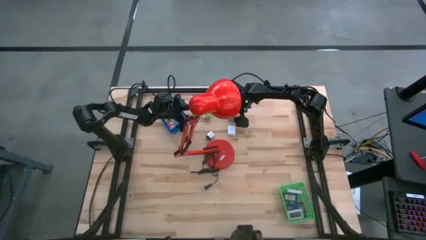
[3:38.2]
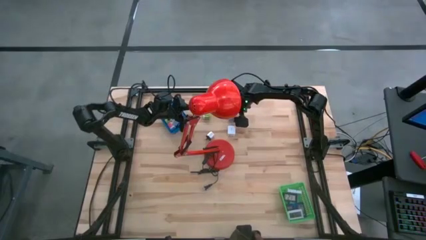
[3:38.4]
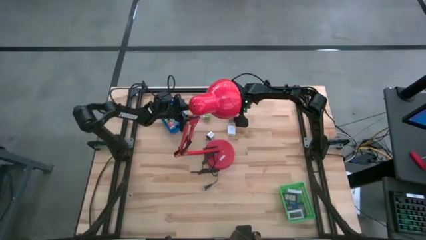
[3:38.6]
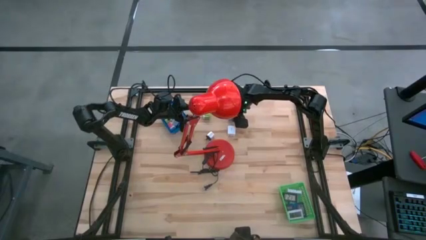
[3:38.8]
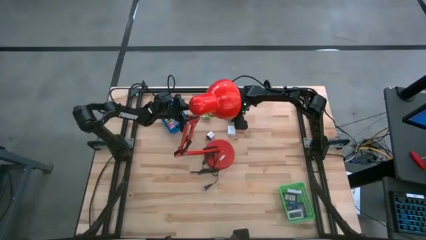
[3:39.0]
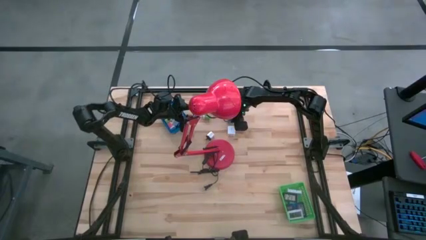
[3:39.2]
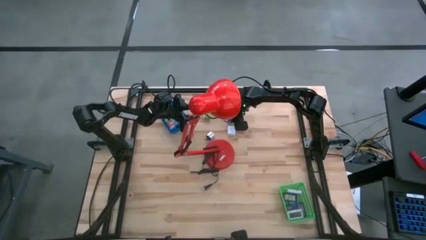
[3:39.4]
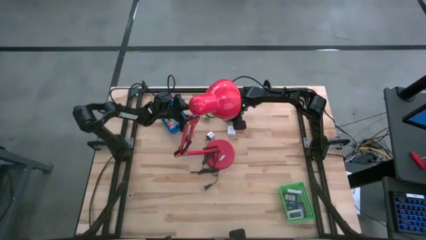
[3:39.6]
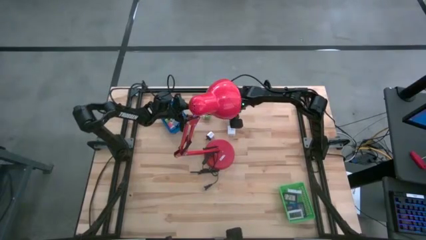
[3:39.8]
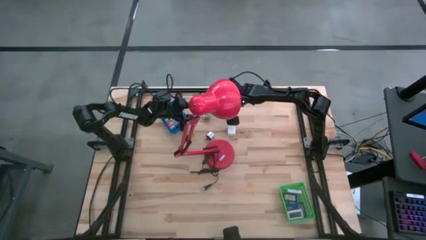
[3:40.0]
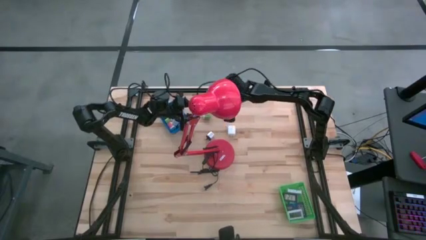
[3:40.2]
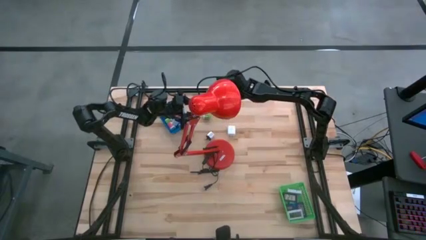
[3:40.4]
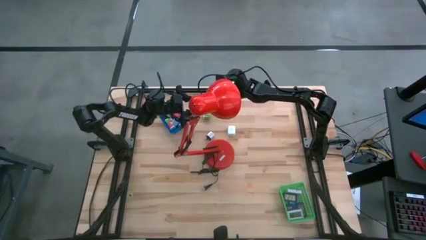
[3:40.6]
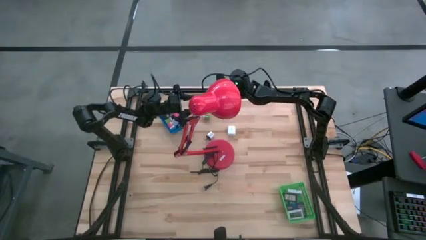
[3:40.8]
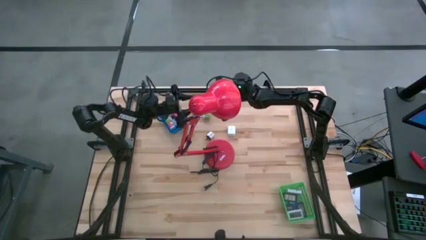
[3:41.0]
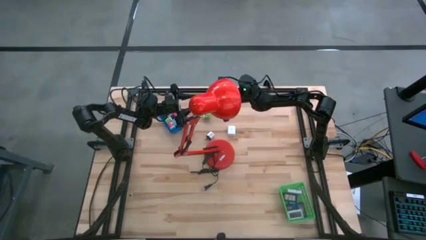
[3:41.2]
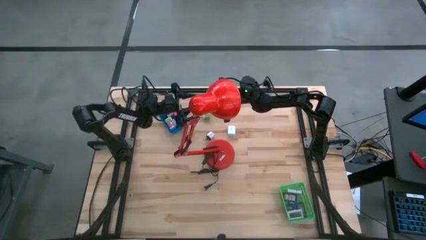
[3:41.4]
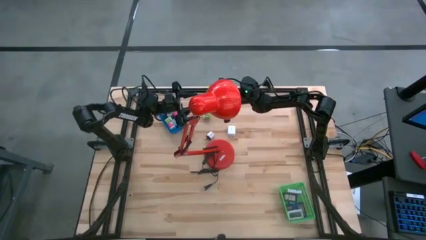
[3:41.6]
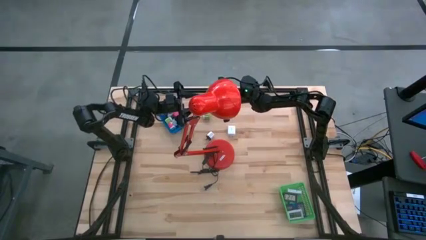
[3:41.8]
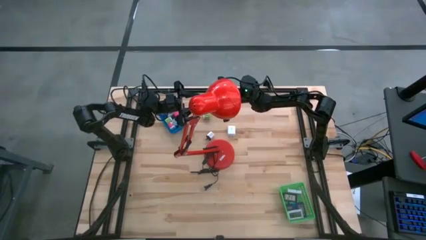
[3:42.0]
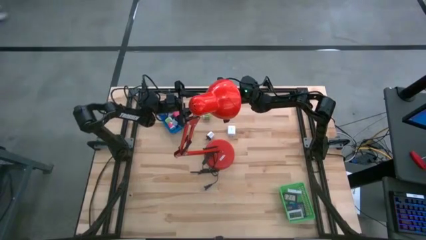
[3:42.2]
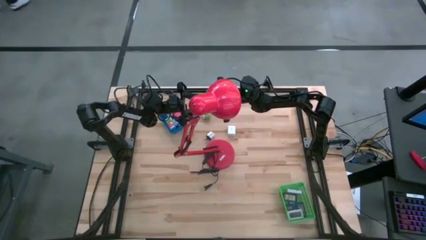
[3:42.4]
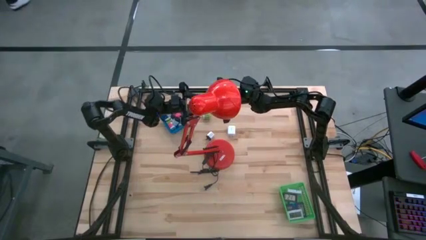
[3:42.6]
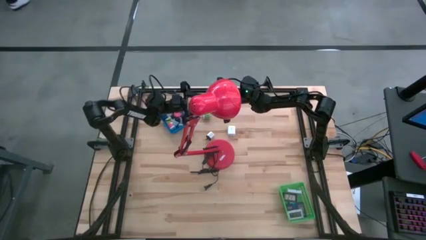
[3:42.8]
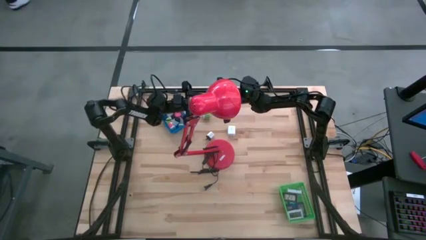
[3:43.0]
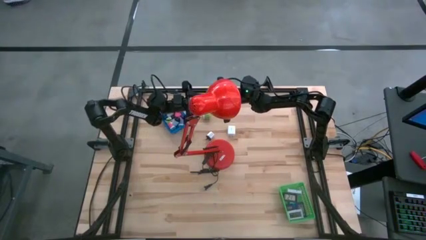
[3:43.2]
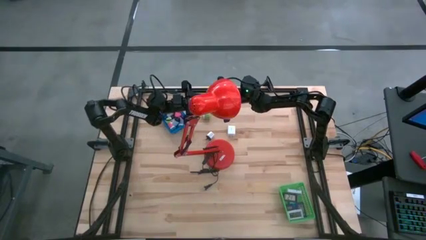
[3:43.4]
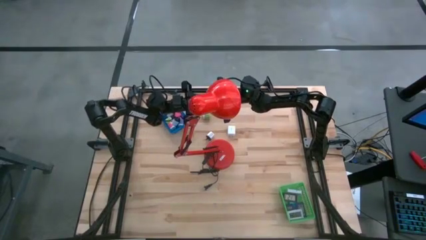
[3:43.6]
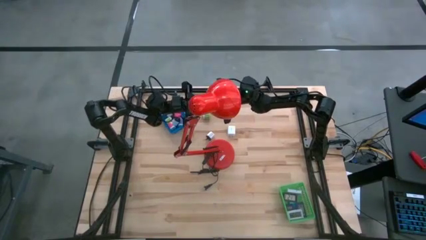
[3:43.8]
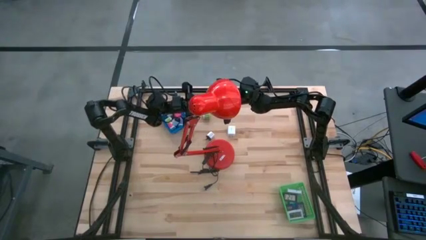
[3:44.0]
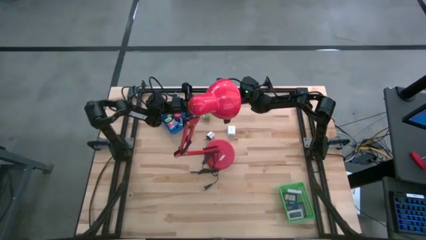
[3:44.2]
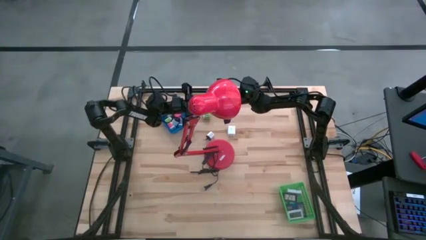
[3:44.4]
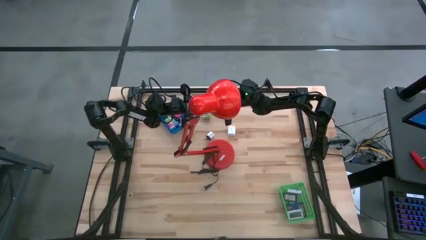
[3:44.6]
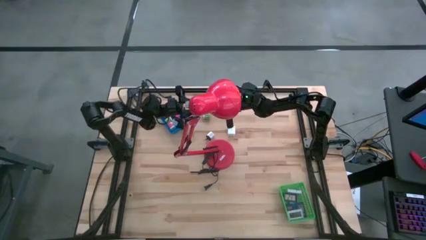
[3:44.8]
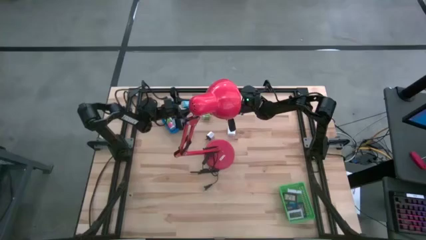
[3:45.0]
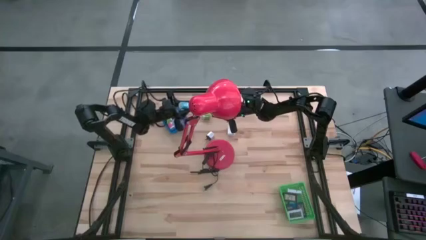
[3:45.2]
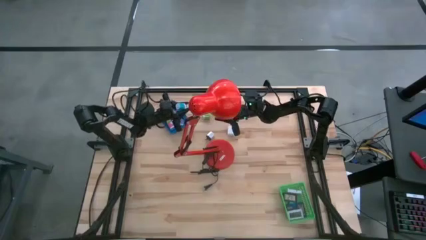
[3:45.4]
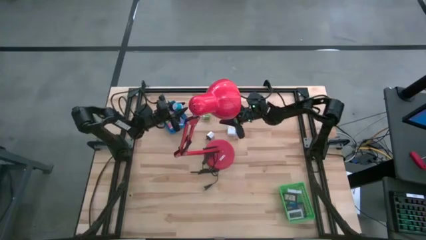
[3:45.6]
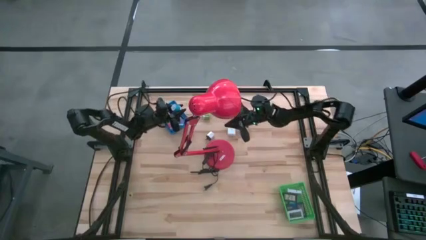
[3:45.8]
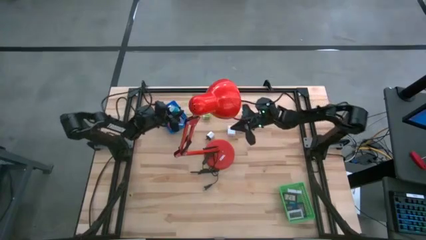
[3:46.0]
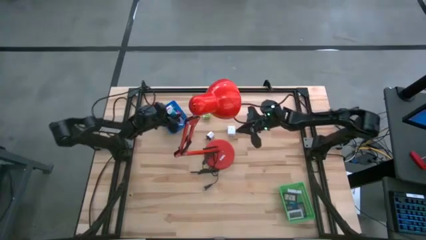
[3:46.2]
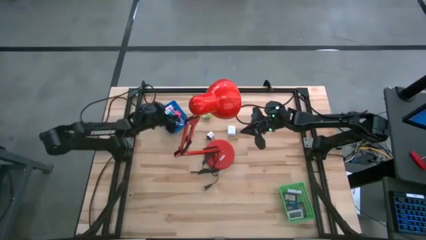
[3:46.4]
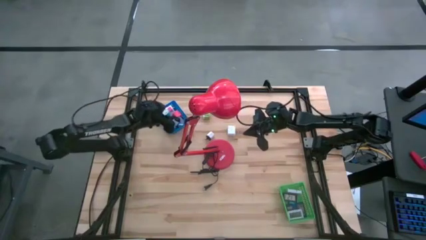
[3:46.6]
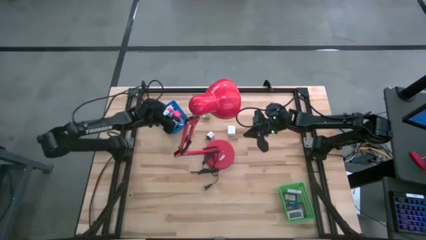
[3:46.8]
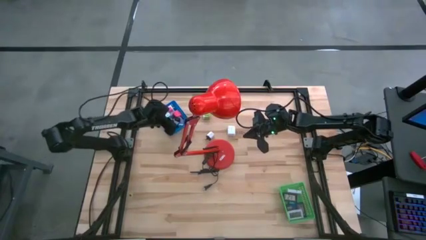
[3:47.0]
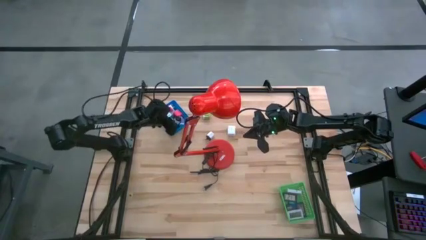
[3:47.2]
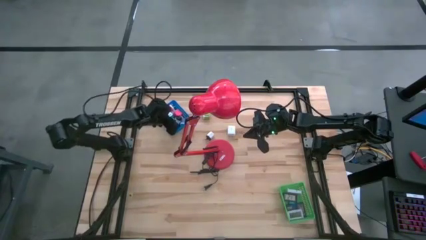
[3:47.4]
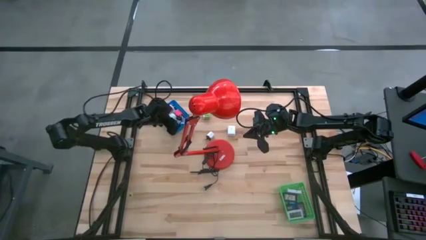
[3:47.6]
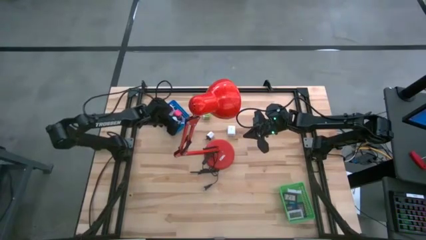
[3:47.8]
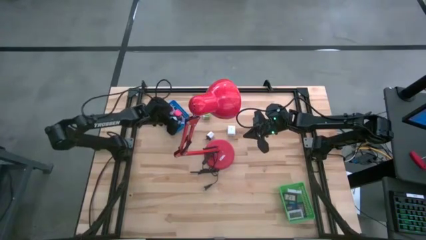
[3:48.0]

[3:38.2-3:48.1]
Task: Pick & Place Office items
Put the light blue charger adapter into the blue bin
